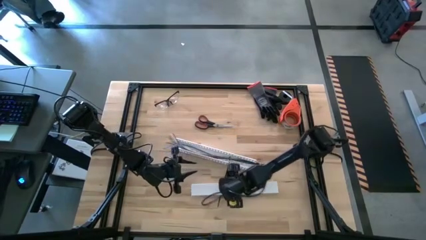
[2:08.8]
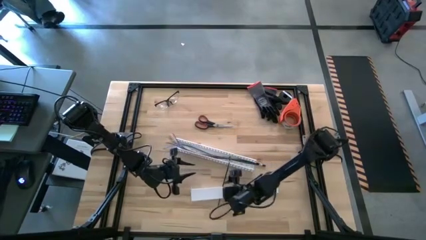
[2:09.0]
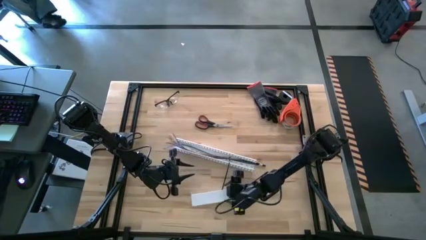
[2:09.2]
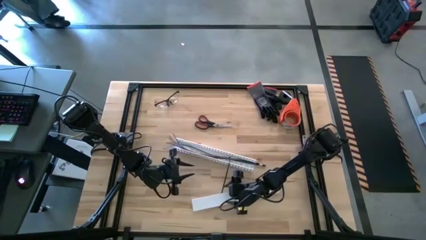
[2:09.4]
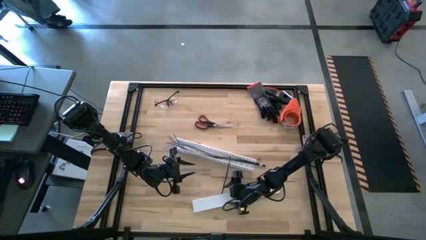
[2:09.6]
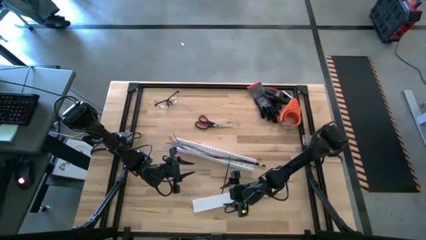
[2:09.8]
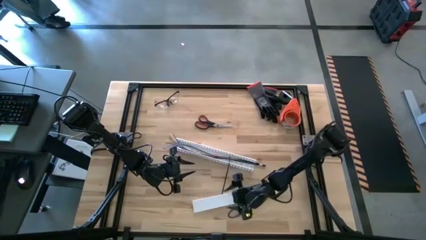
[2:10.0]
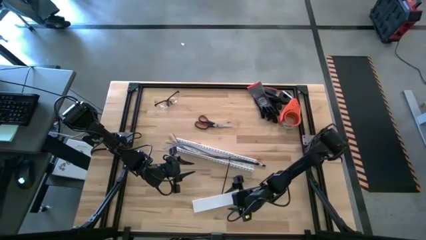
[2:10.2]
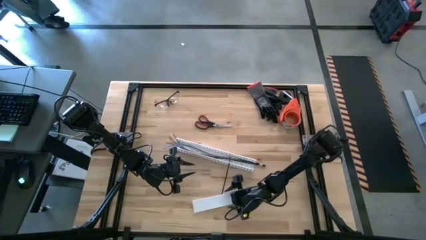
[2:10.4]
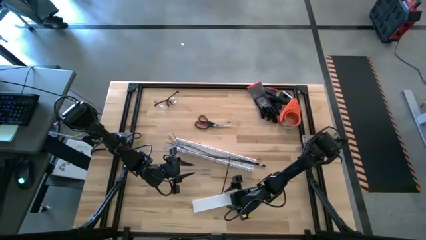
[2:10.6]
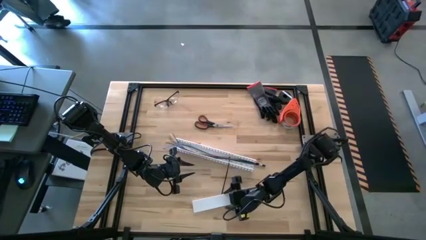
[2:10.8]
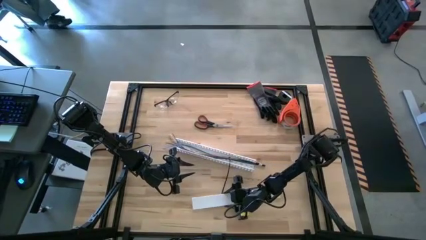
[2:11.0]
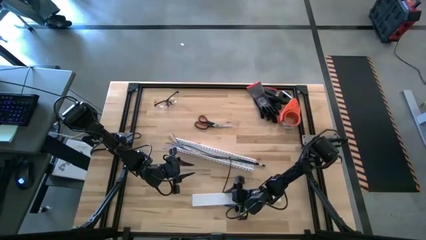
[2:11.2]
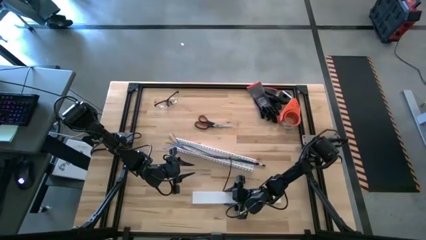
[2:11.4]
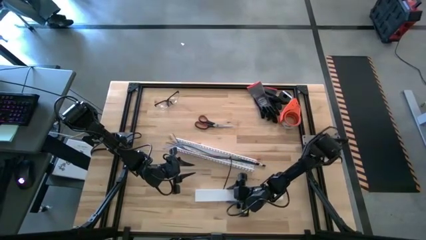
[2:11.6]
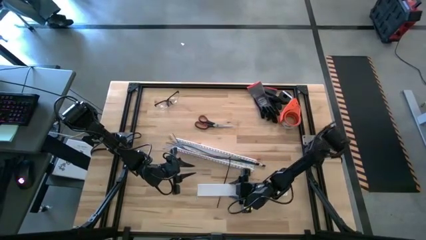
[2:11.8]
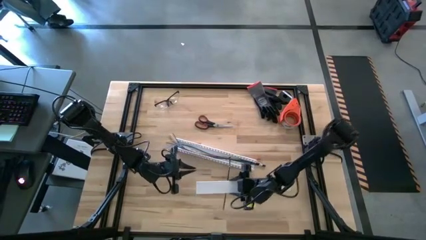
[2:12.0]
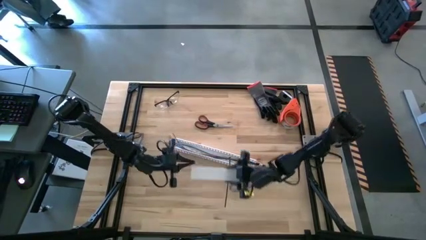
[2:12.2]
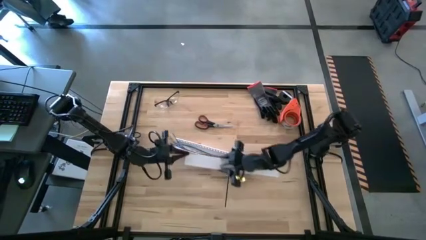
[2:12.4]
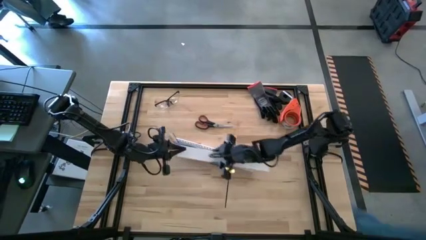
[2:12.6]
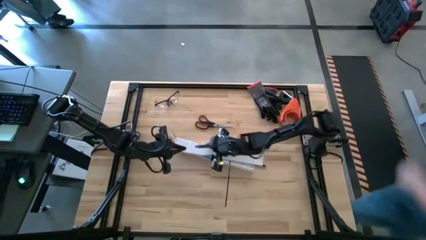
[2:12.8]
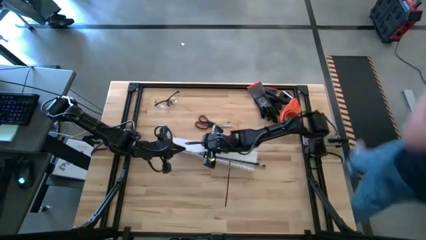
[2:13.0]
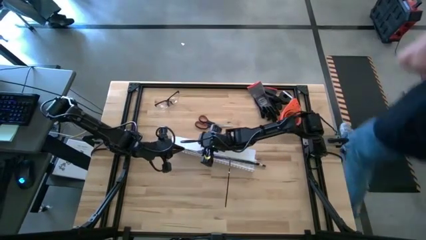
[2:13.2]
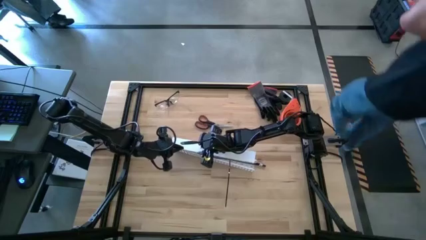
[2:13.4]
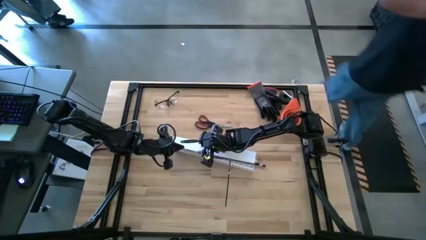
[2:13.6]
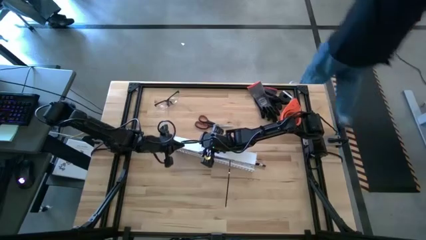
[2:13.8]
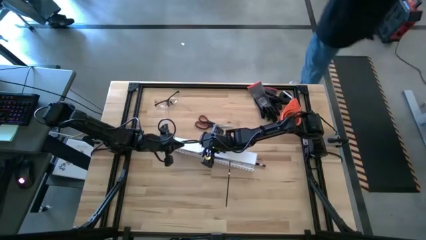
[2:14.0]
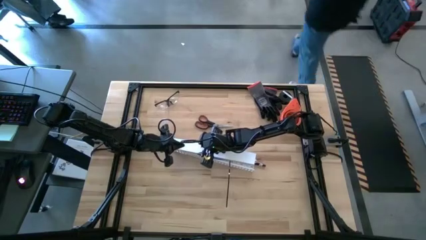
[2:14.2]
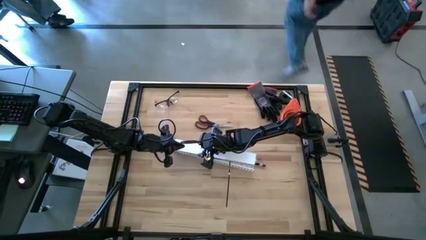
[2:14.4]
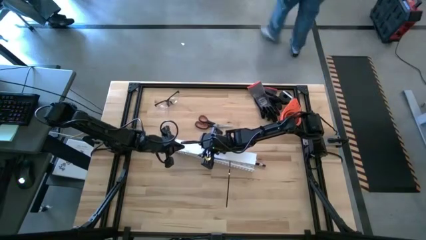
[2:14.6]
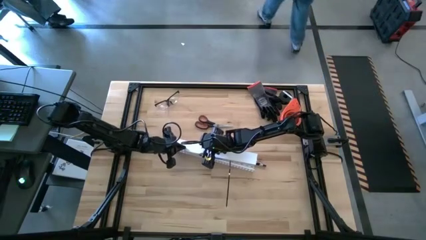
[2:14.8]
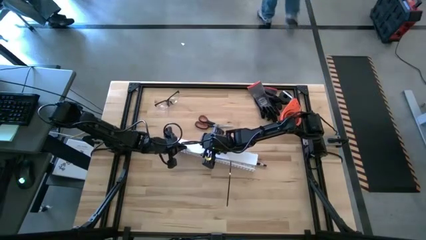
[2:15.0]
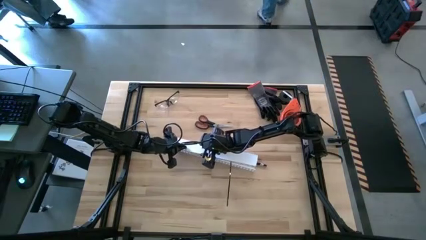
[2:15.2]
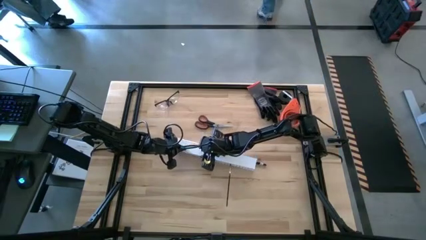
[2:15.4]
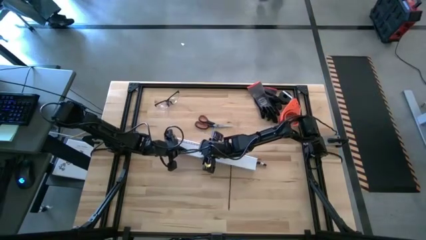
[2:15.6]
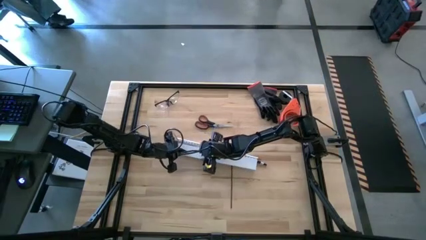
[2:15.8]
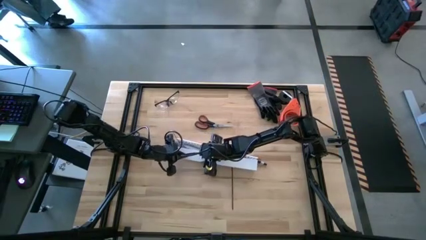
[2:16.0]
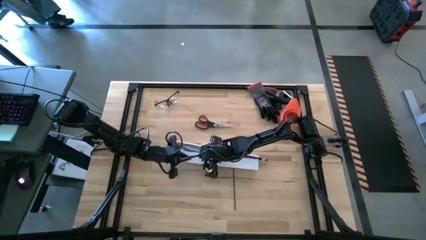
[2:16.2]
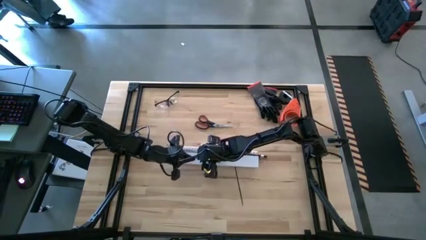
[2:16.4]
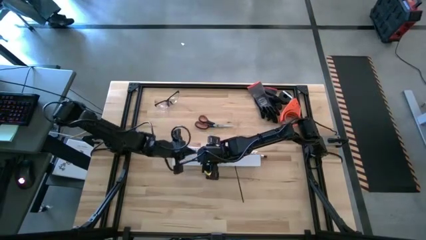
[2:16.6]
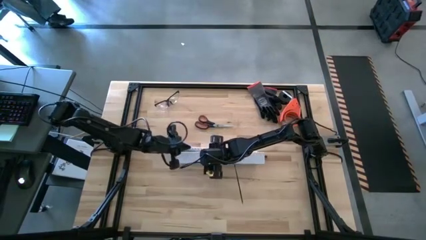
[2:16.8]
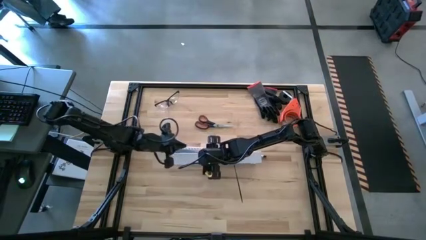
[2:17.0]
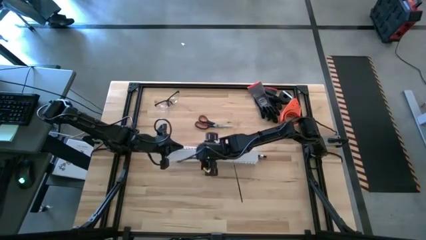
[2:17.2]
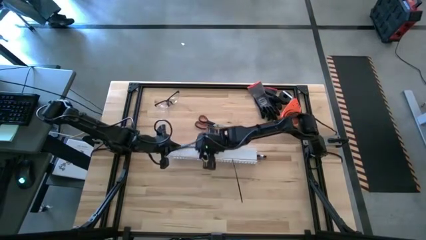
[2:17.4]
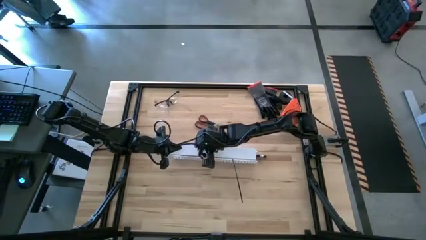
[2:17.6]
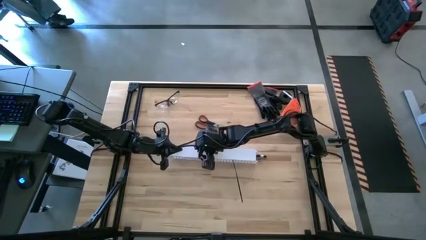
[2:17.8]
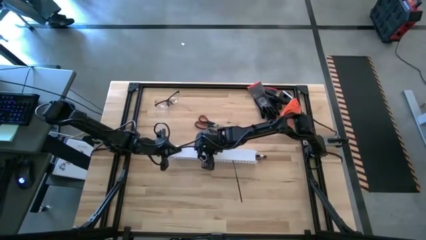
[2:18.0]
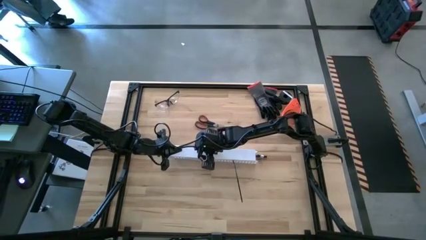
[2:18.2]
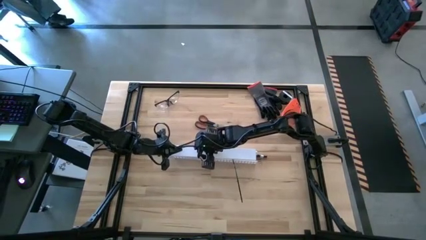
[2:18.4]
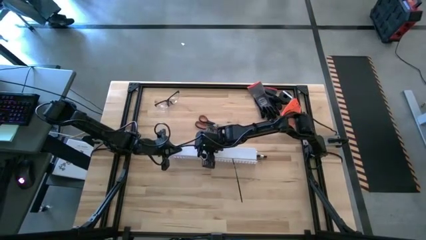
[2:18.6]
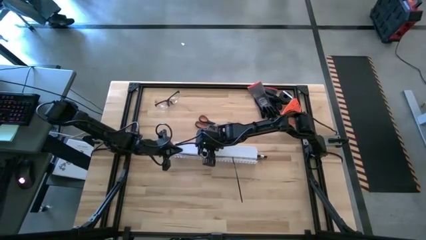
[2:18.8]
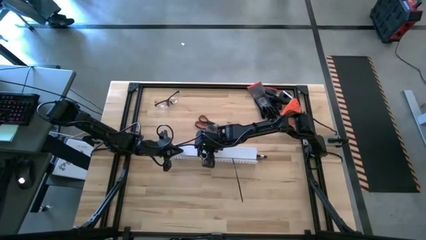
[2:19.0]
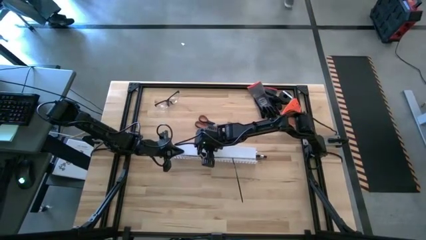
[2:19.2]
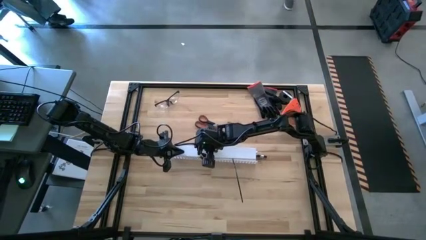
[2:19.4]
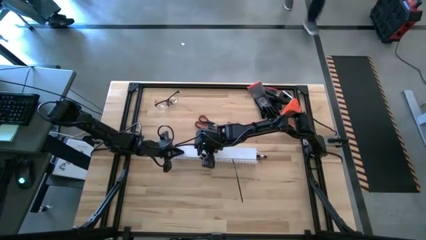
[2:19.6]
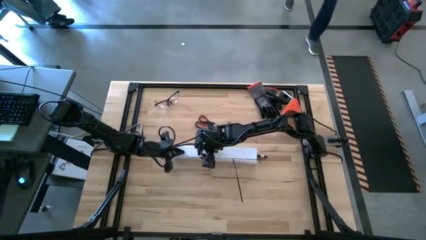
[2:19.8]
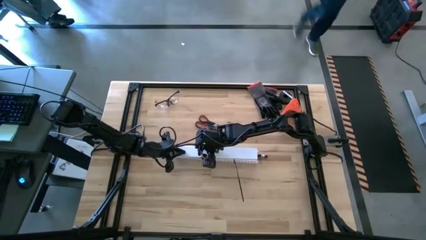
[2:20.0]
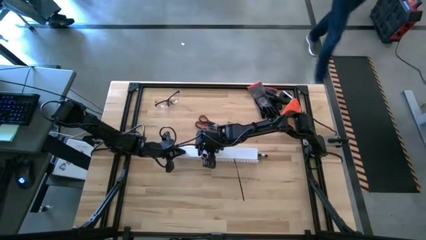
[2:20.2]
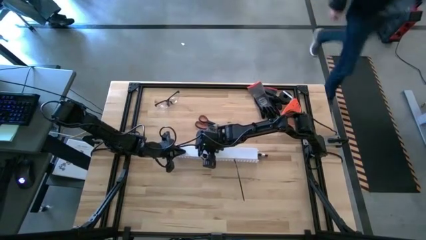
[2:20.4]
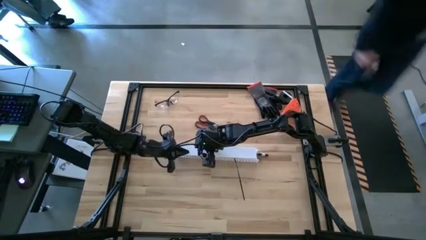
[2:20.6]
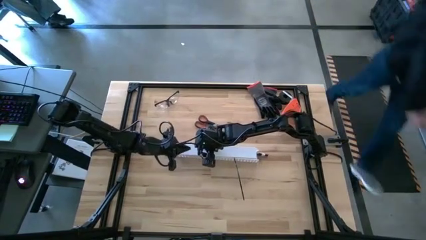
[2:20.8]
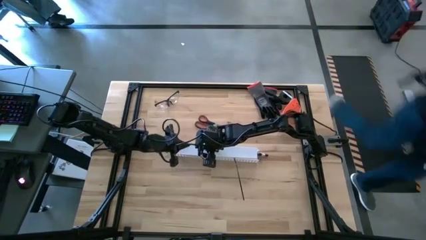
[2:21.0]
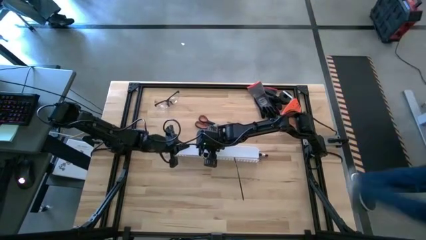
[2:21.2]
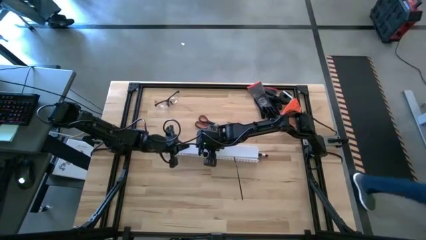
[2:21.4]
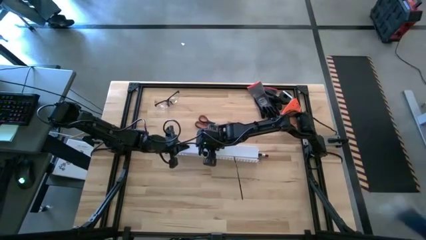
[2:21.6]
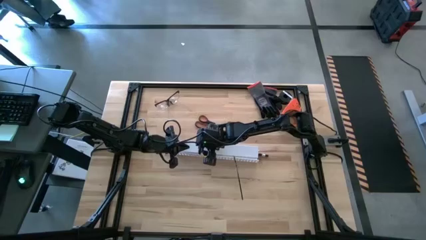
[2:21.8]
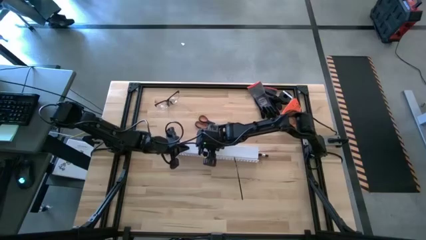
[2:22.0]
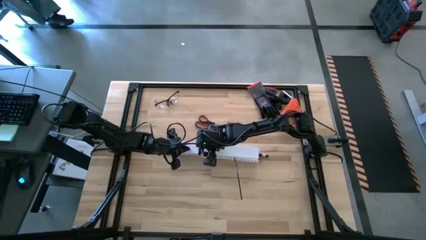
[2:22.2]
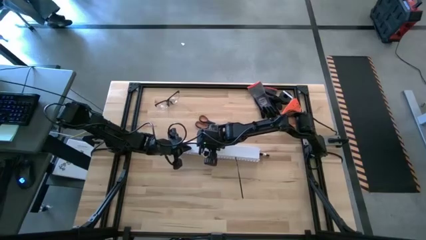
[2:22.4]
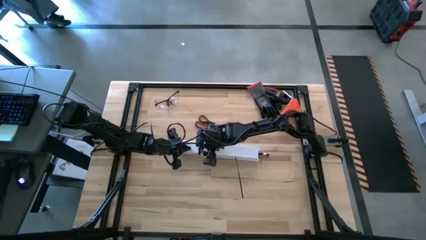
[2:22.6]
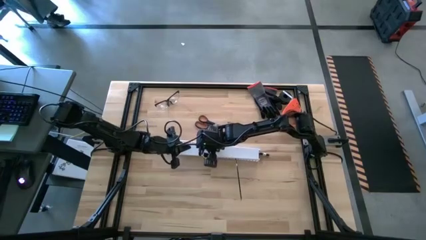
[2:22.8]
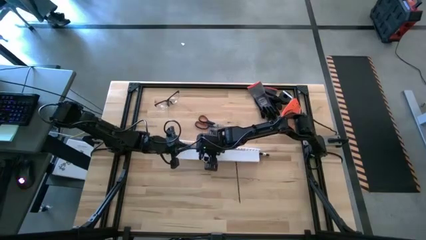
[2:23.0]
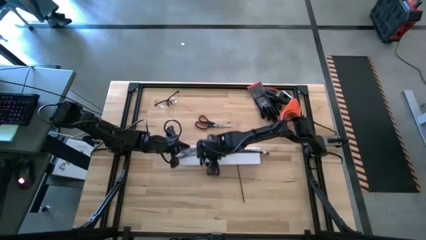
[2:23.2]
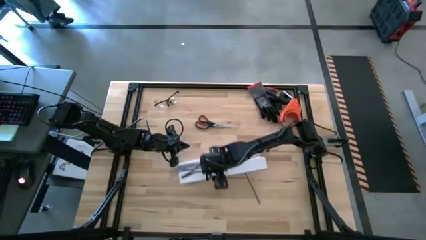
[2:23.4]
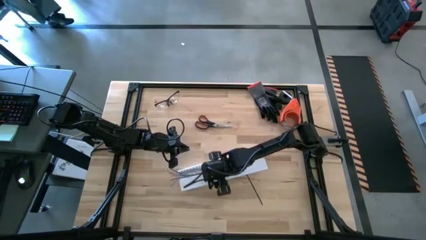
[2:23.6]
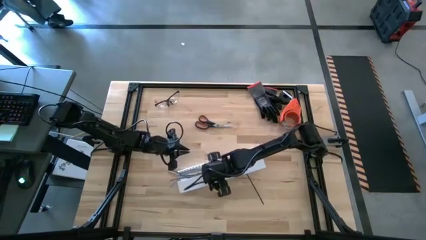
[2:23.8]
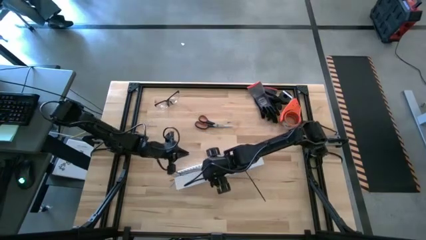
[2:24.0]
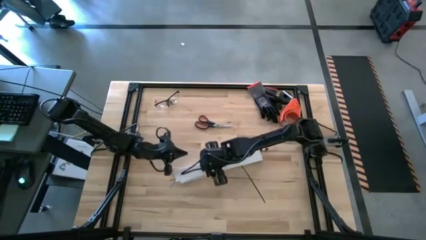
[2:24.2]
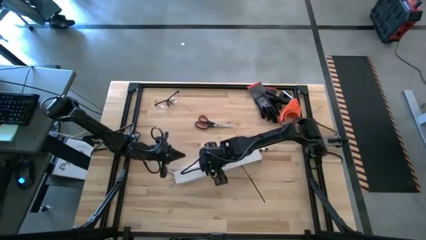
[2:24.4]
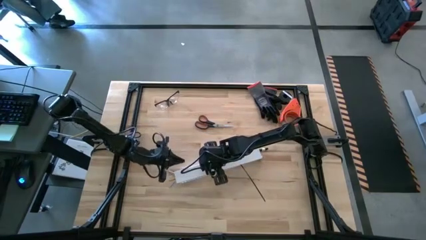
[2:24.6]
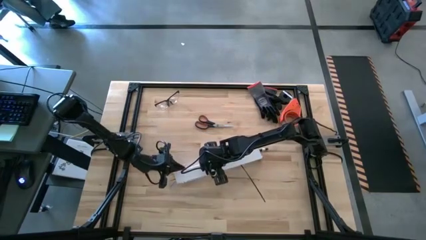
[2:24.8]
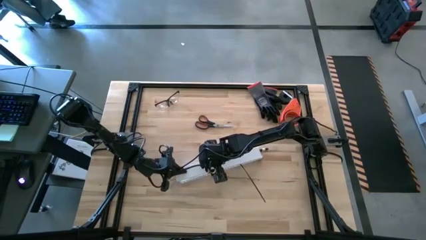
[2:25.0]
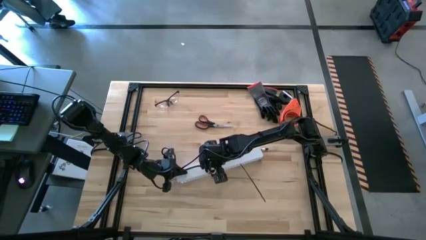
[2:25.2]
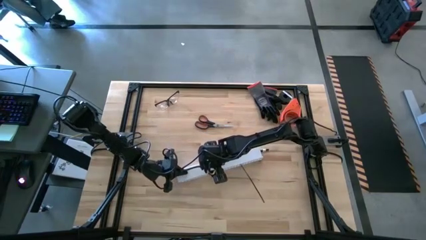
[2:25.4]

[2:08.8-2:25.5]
Task: Ziptie cables
Close the white cable duct lid
